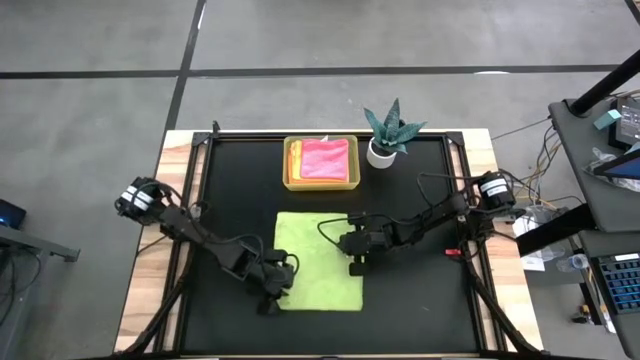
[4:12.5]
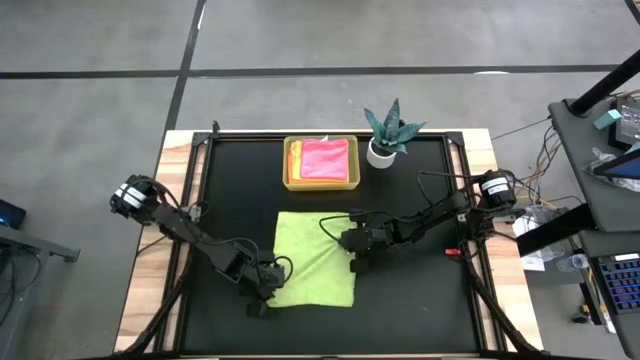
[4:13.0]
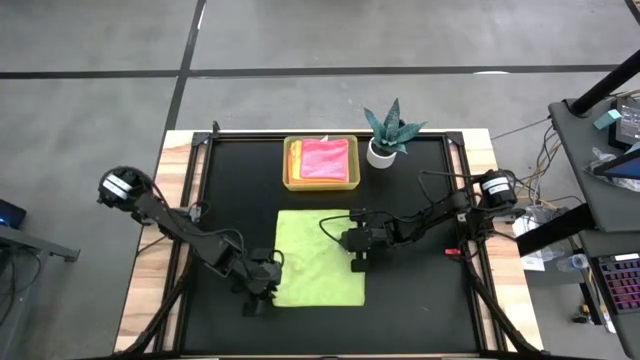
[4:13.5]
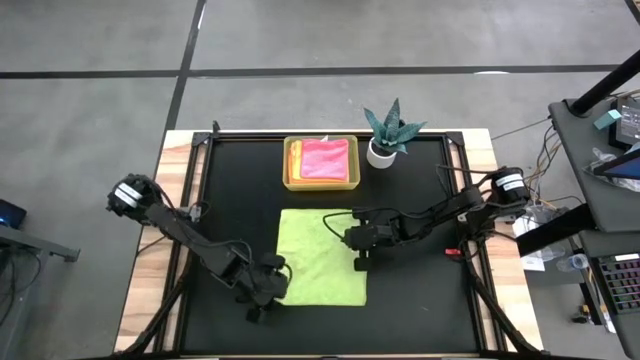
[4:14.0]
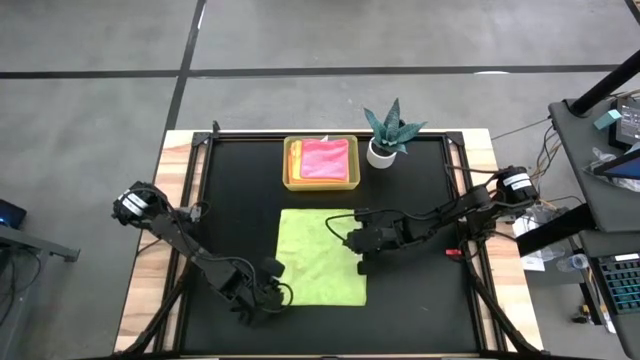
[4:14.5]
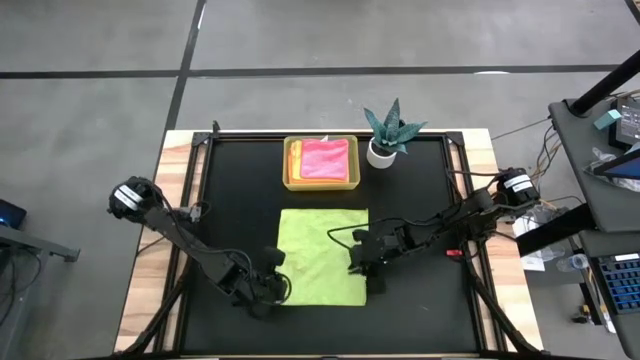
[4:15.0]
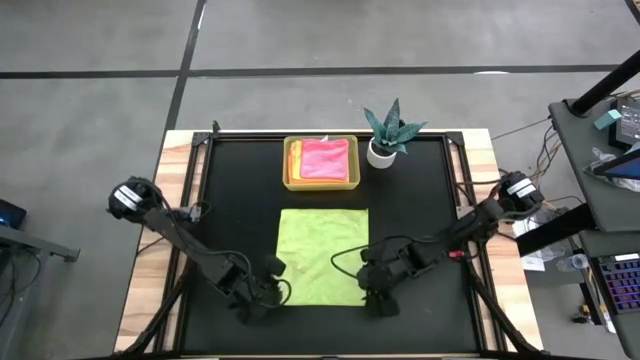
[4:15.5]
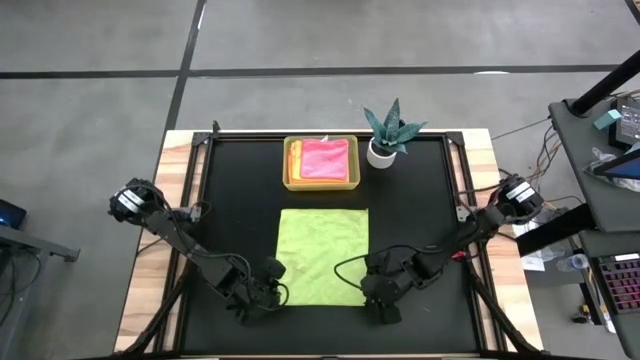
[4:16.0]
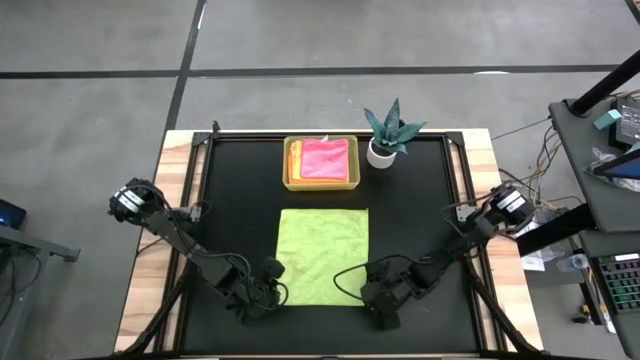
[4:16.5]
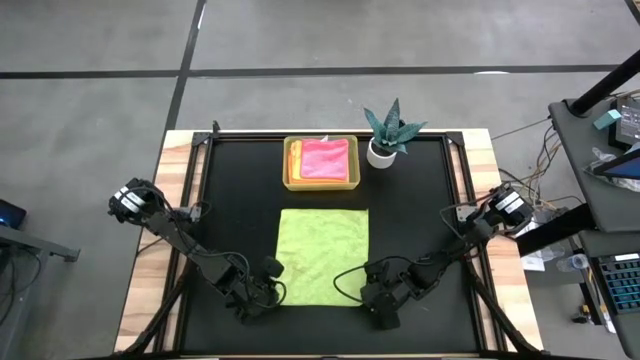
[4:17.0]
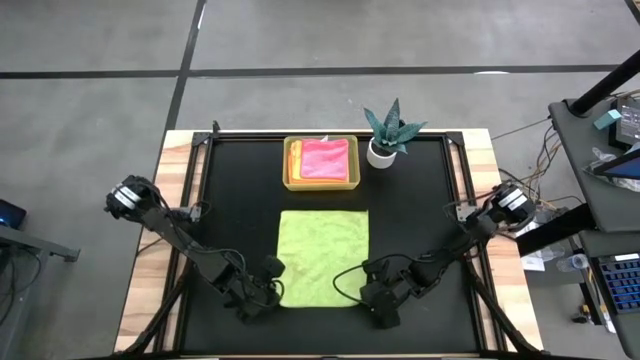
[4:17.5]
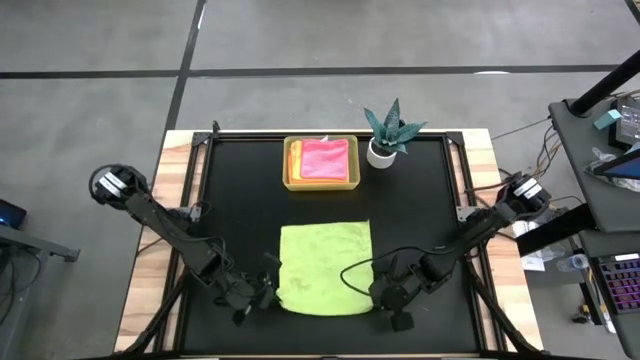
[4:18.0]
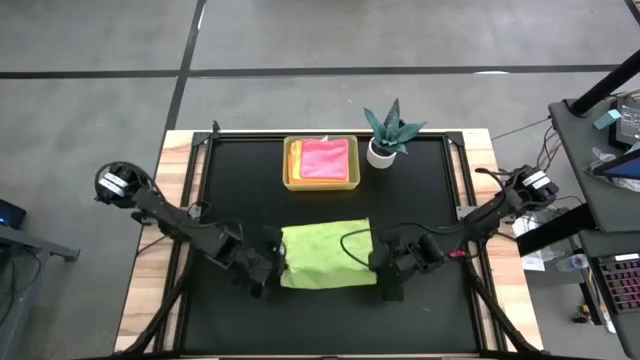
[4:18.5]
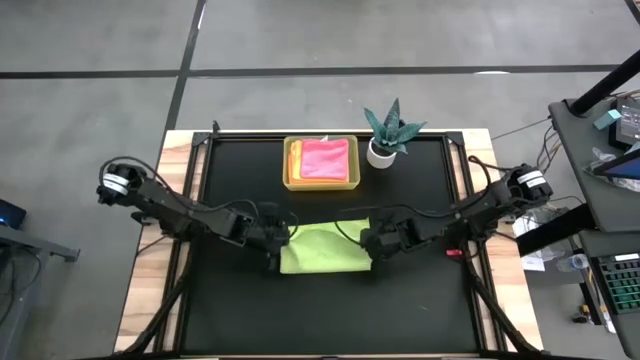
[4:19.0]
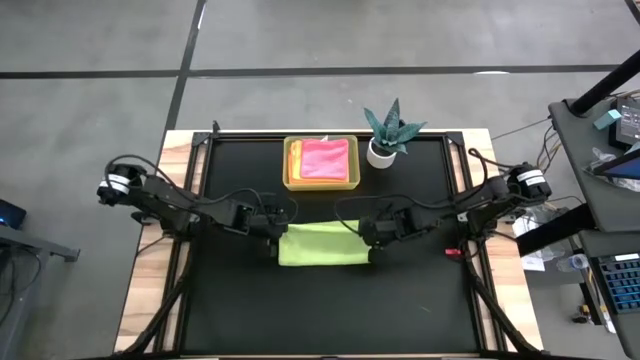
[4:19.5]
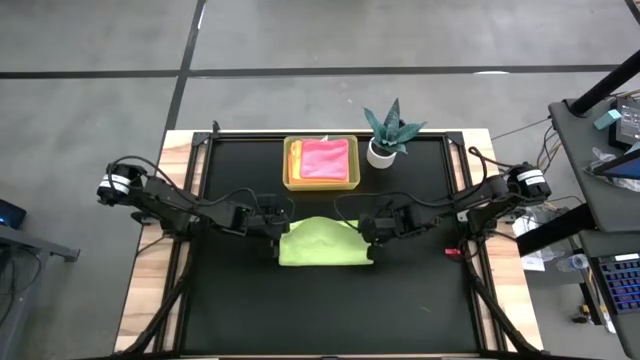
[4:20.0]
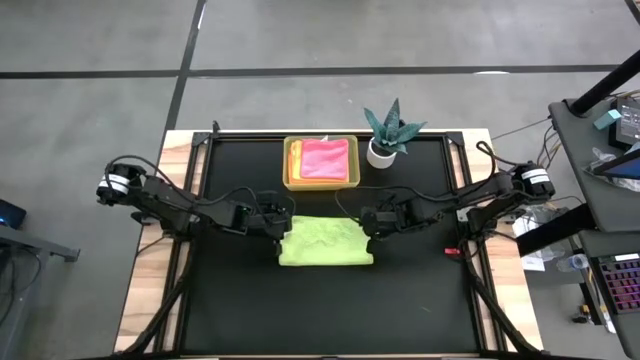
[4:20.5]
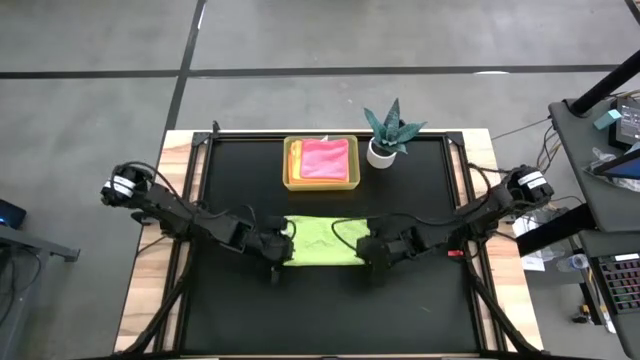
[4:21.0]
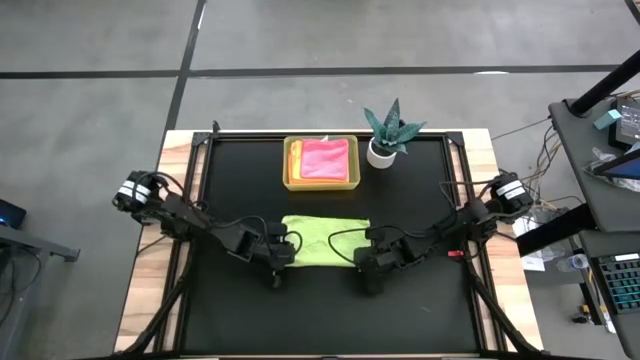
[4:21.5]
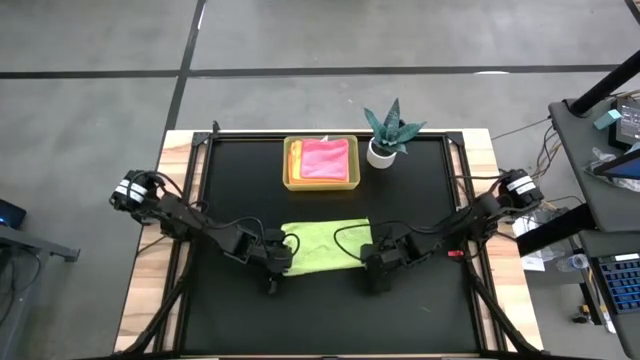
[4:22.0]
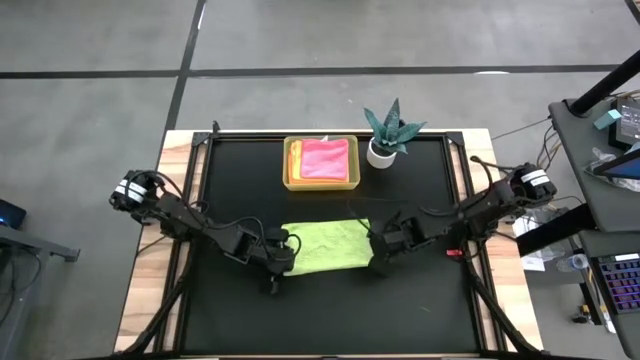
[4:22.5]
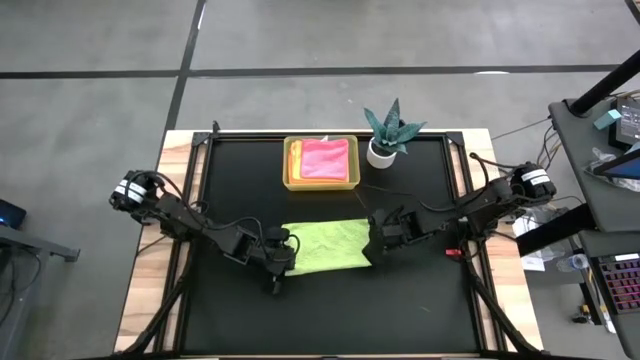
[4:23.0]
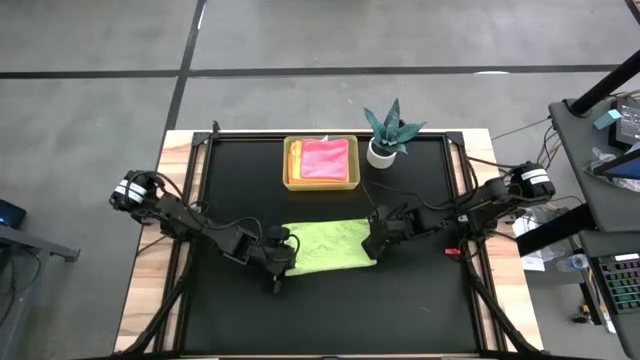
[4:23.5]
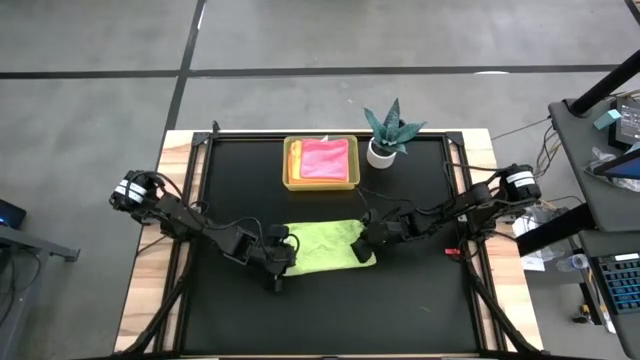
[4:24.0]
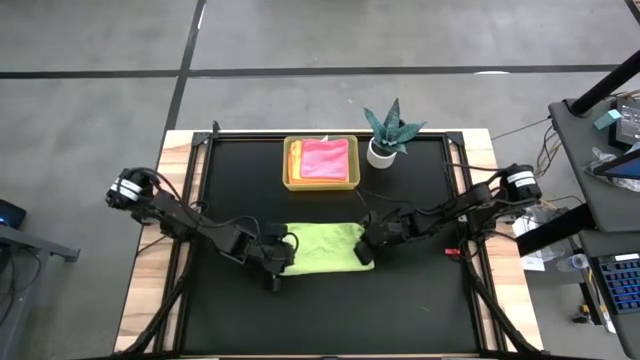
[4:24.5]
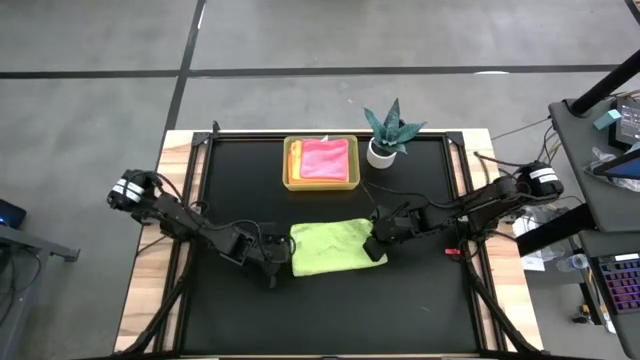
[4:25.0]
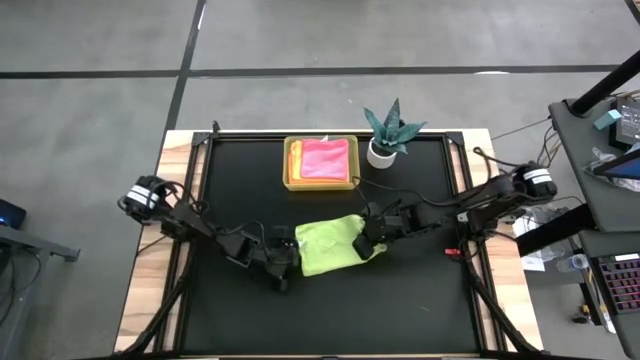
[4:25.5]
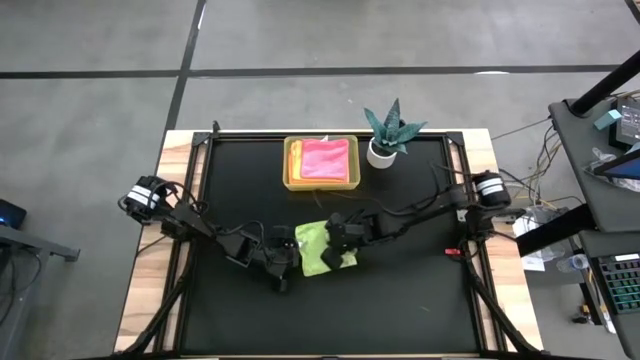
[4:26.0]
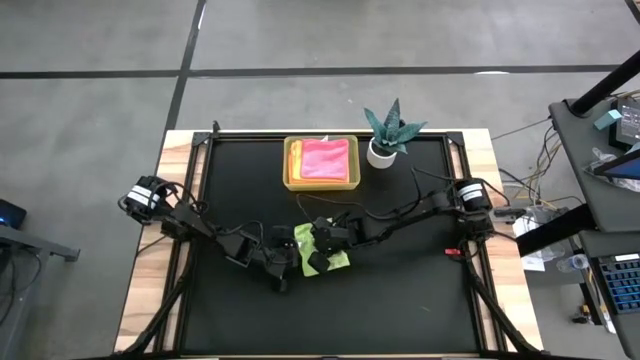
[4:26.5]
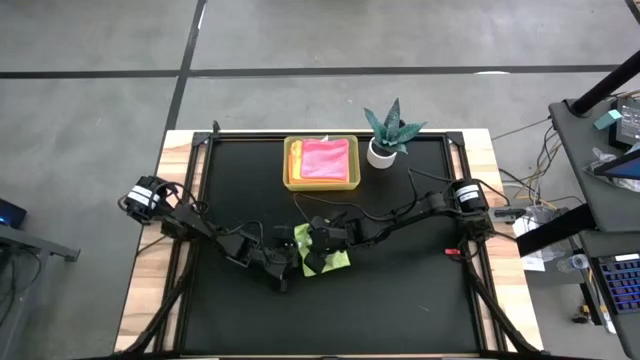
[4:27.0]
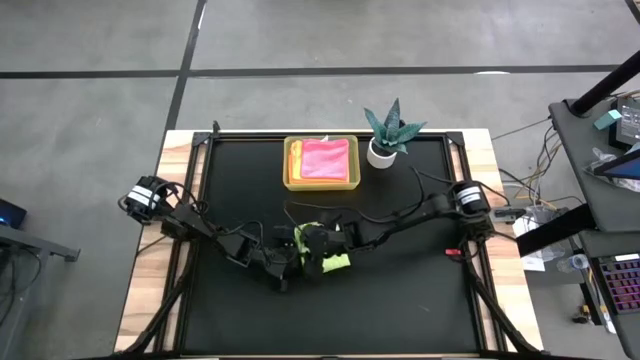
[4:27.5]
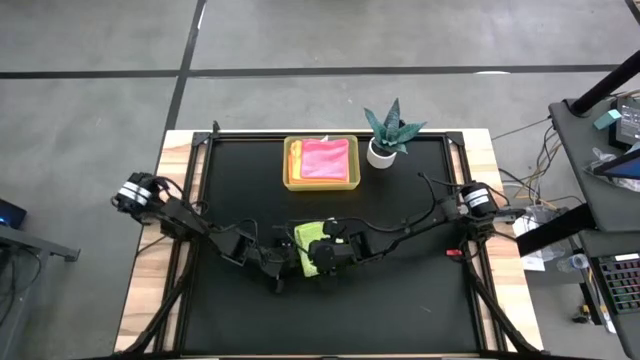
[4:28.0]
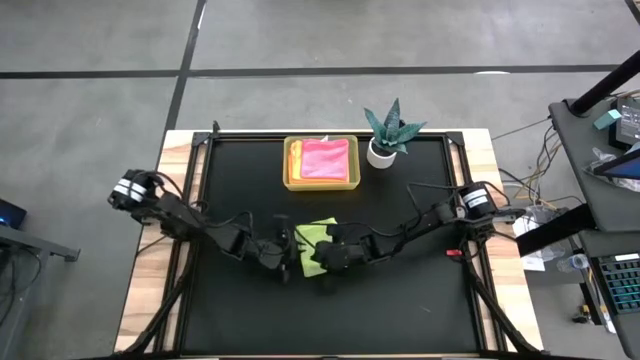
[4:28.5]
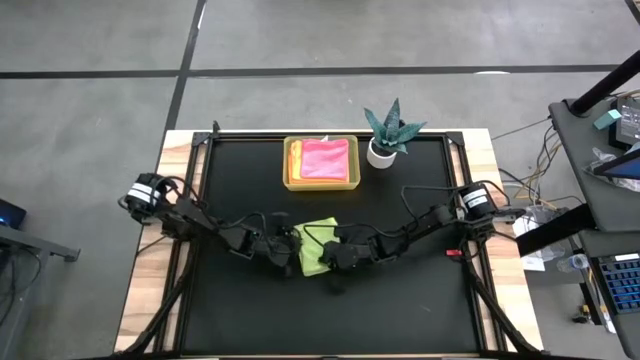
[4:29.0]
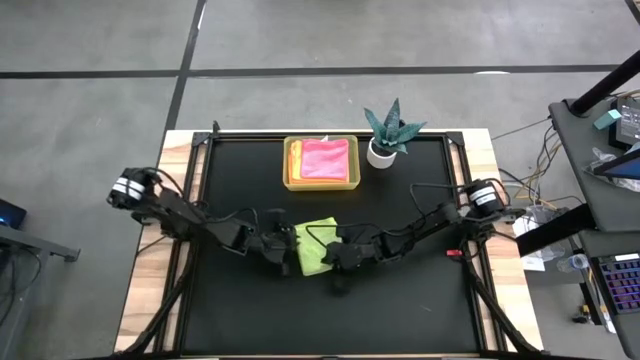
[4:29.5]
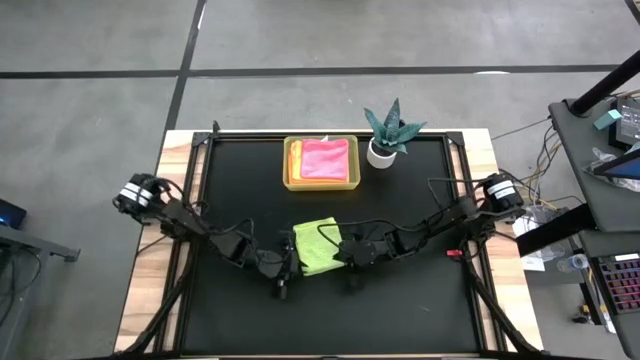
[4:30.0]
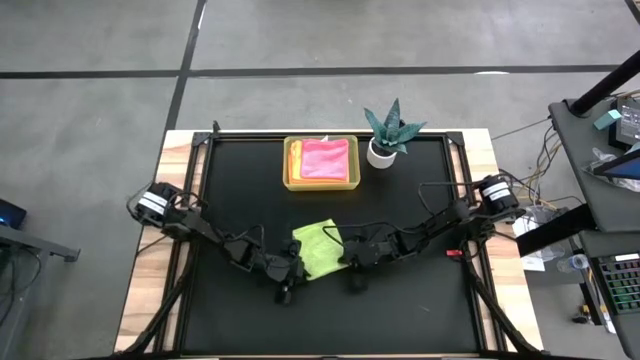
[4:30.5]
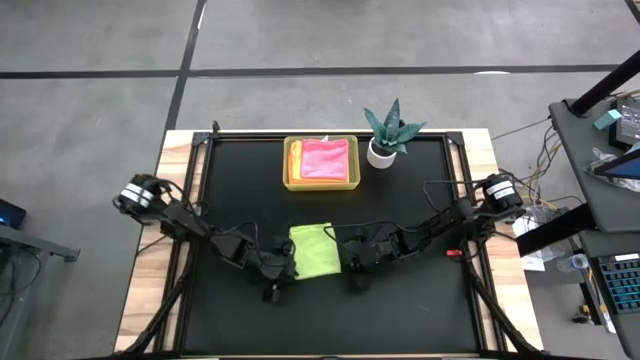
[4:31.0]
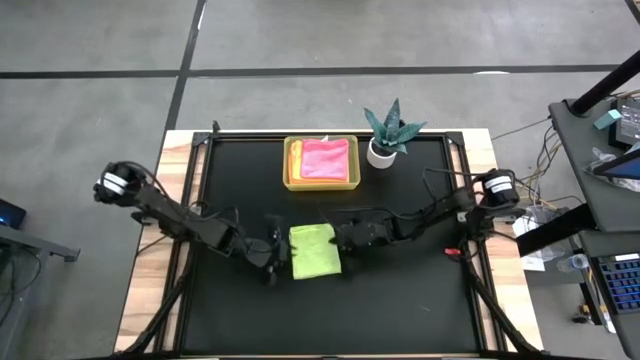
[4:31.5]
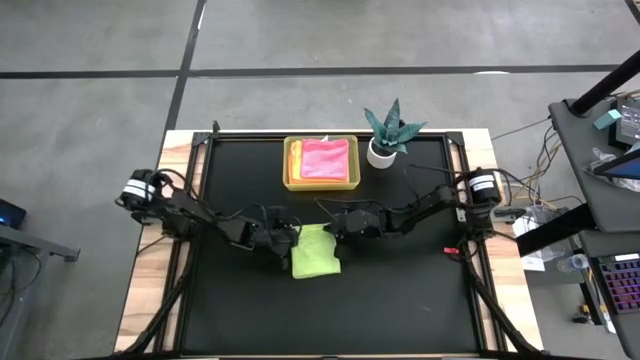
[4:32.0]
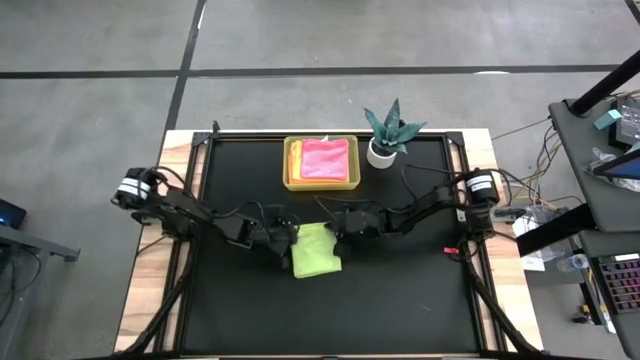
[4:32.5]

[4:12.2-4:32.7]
Task: Fold microfiber towels
Fold the green microfiber cloth

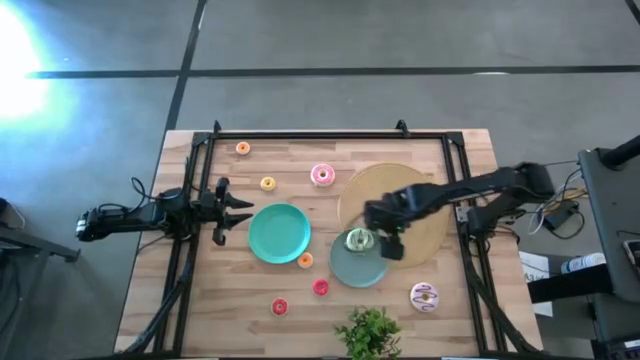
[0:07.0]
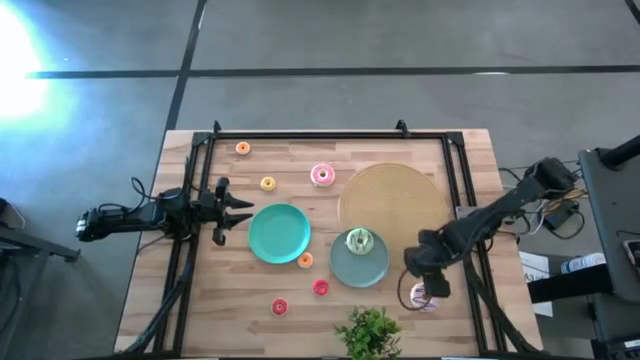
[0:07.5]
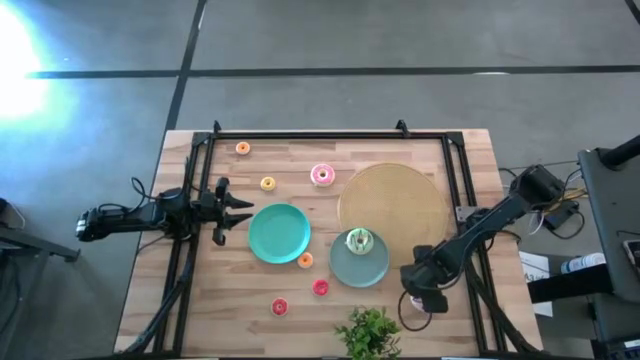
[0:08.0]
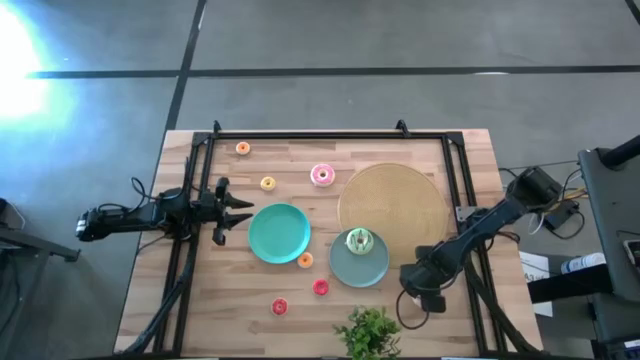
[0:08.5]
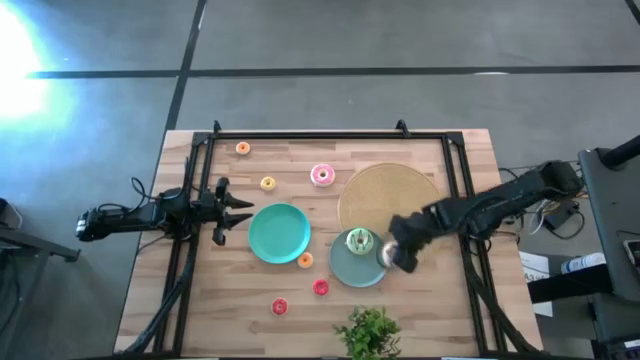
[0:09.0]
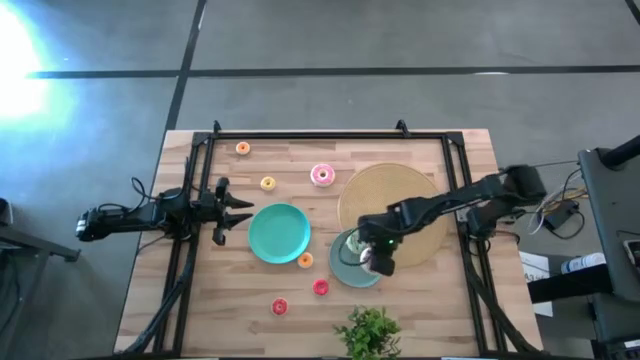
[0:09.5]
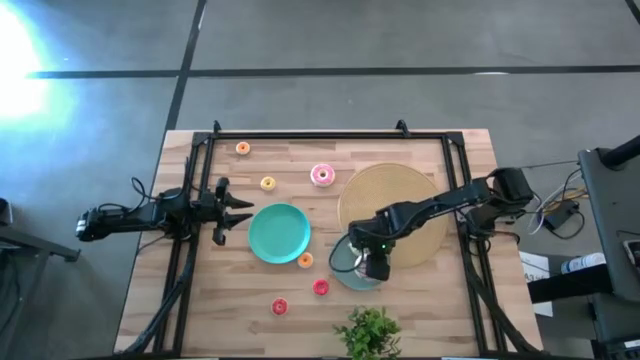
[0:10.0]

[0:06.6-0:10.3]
Task: Pick & Place donuts
Put the large purple donut on the blue plate
